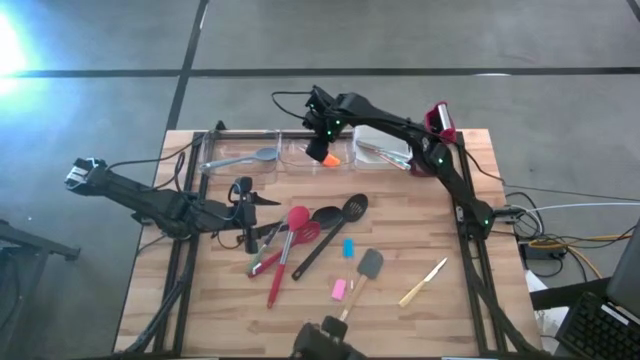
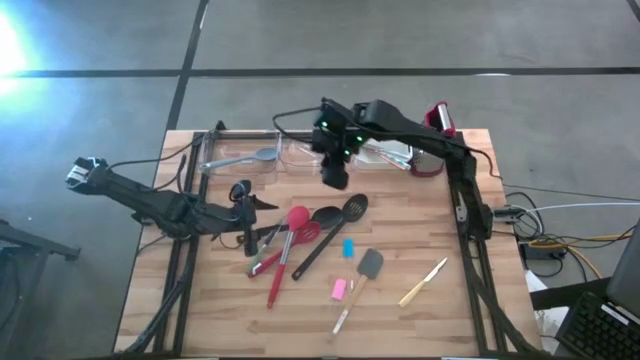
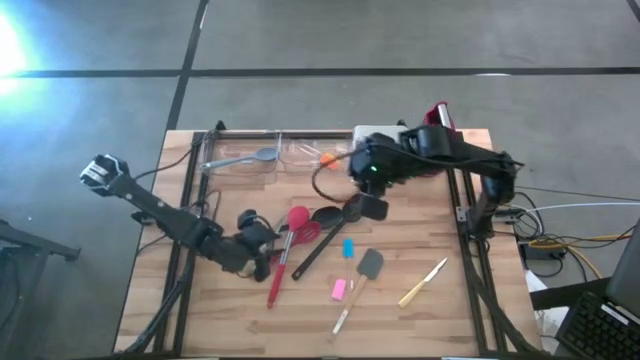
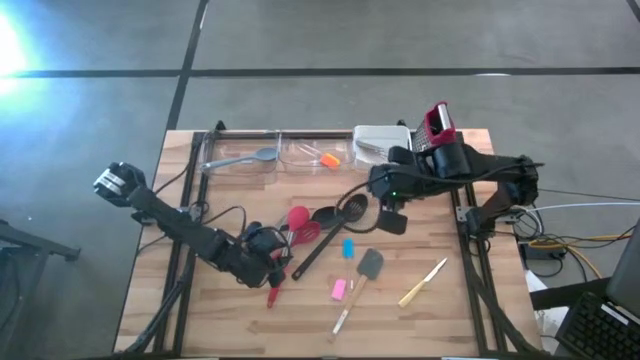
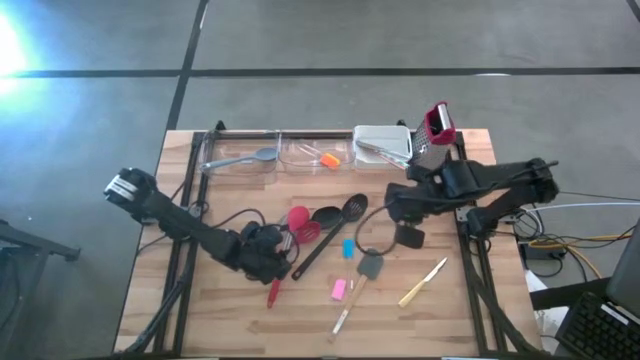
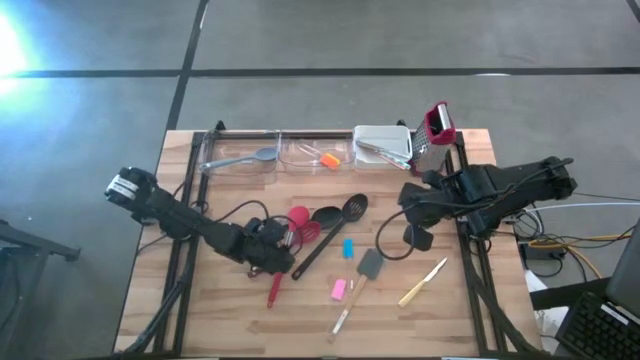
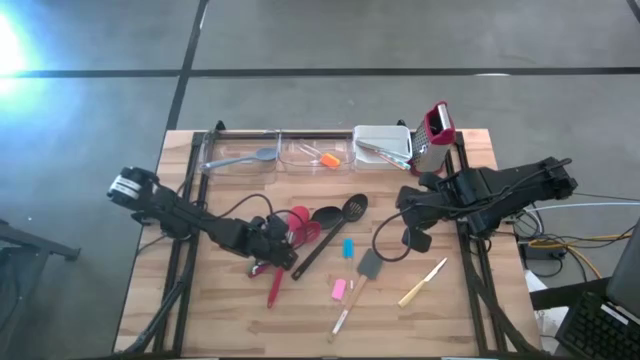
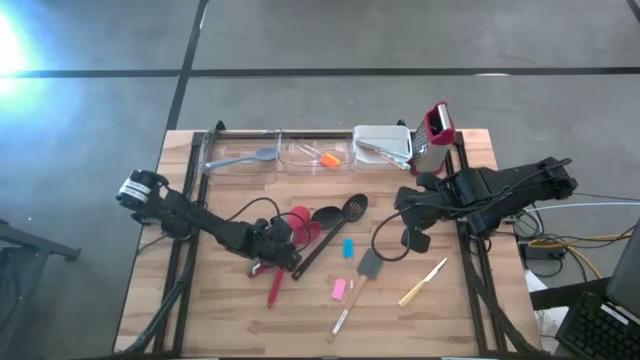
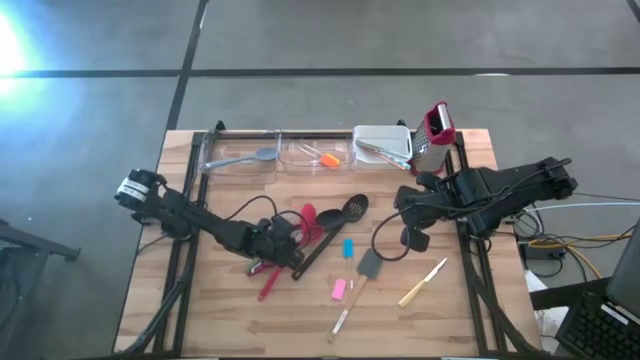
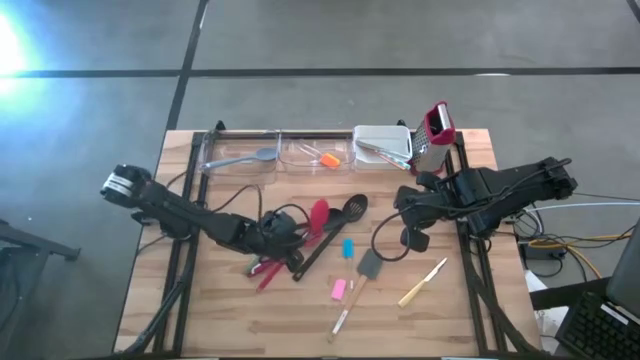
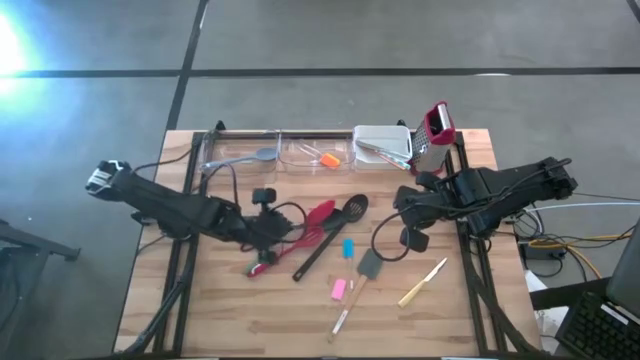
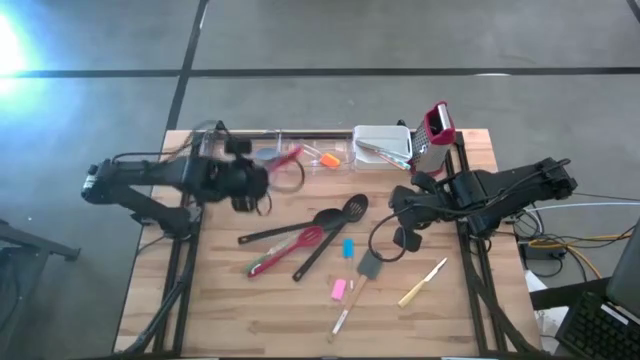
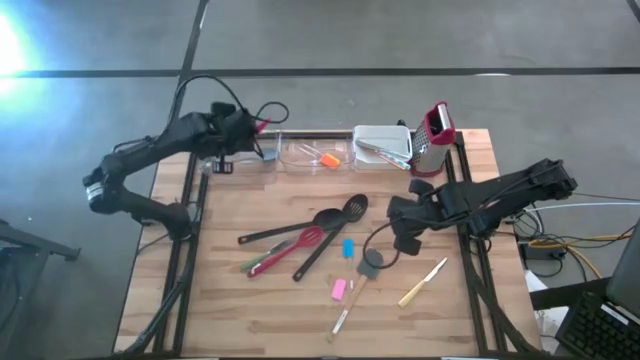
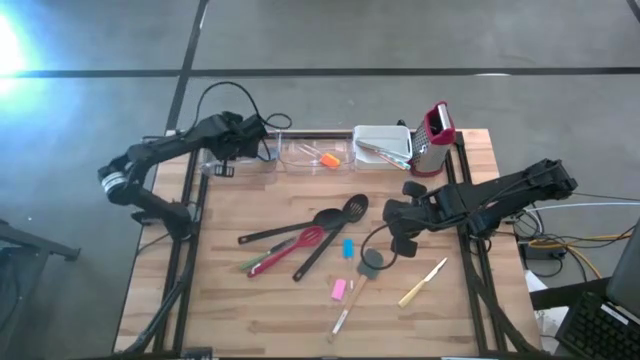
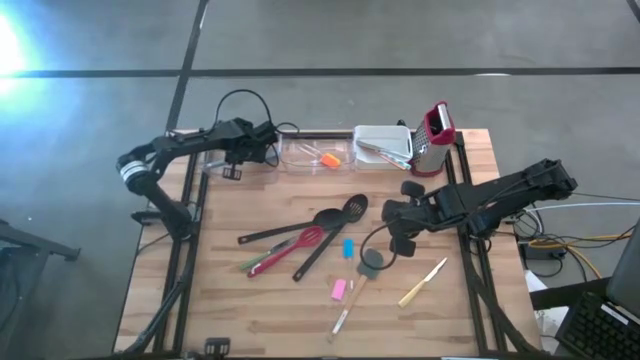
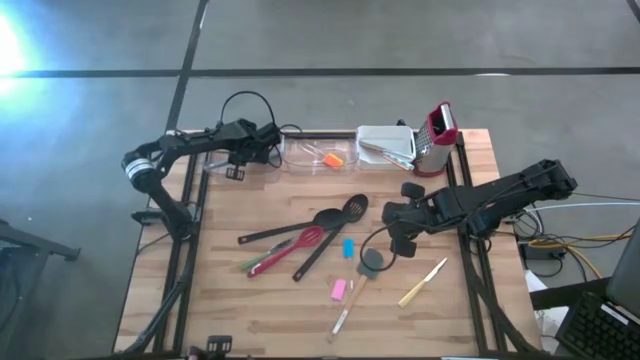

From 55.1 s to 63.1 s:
Task: Pick & Place Kitchen Items
Put the red serving spoon into the left transparent bin

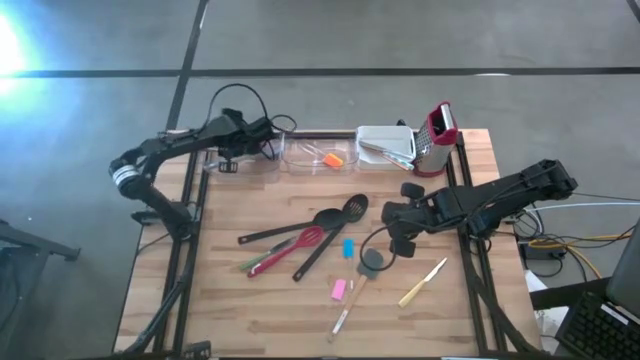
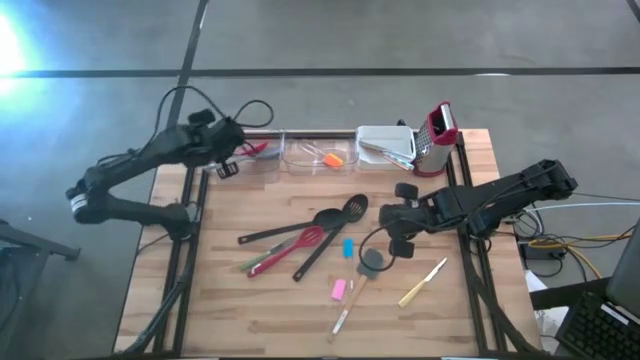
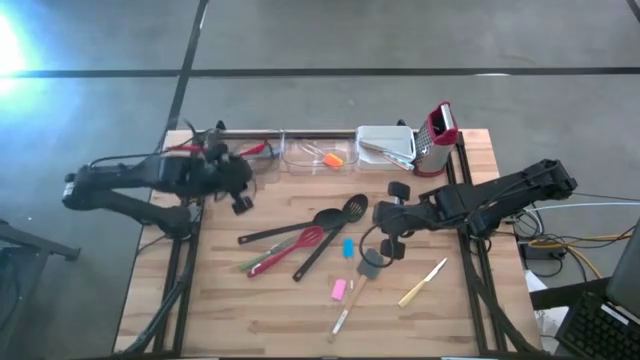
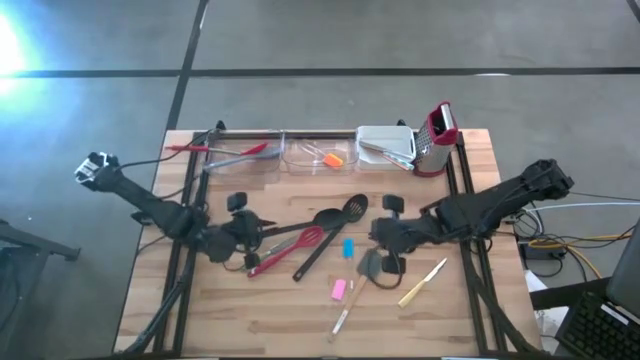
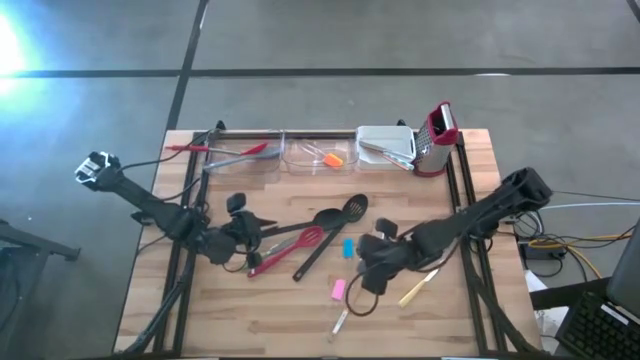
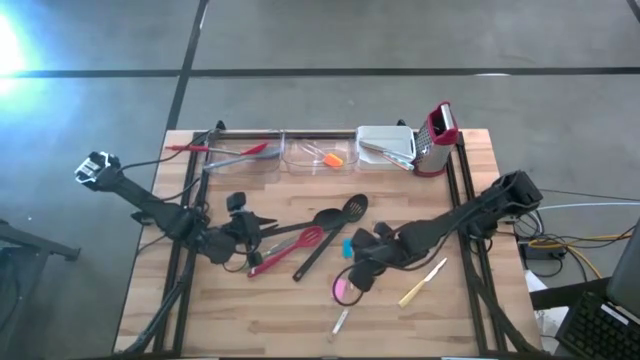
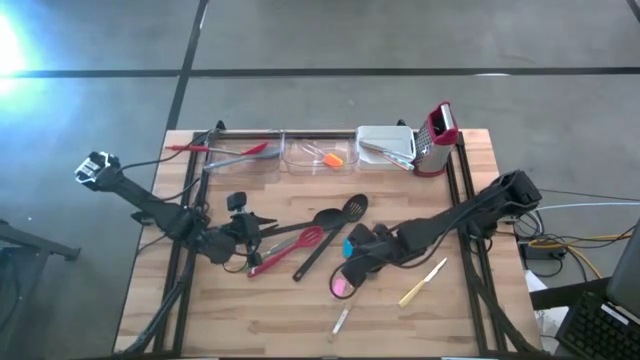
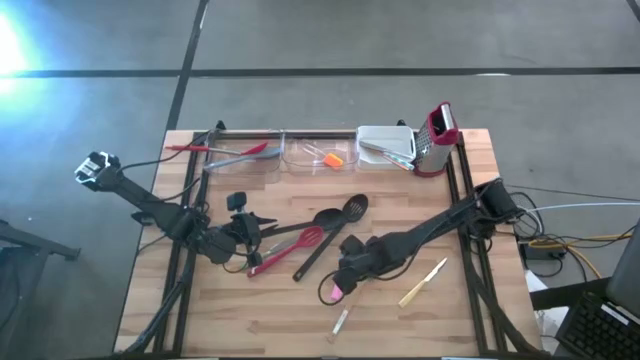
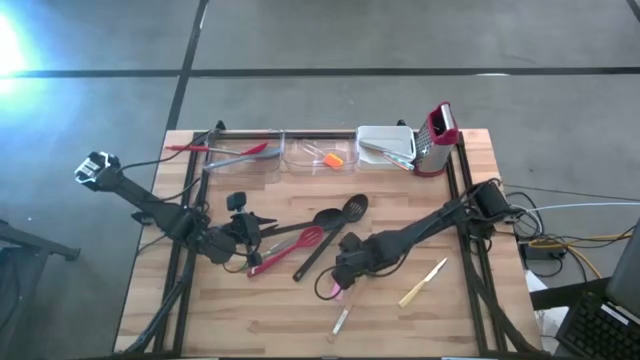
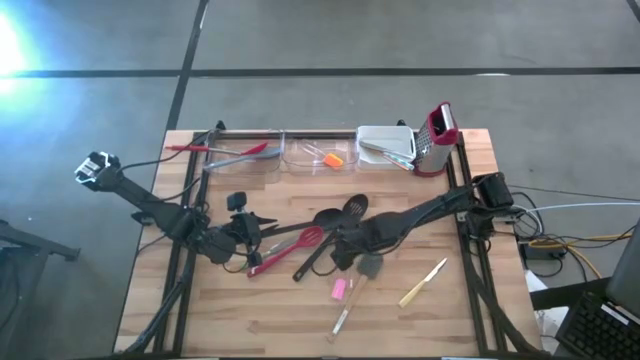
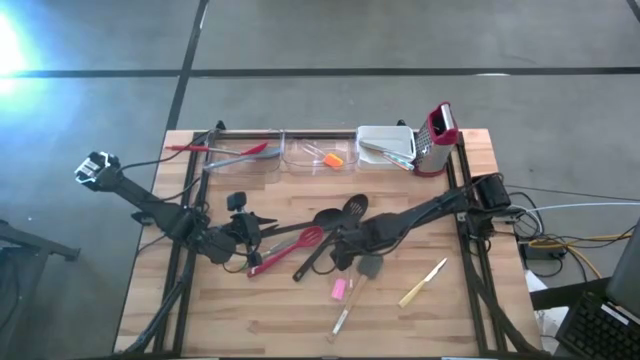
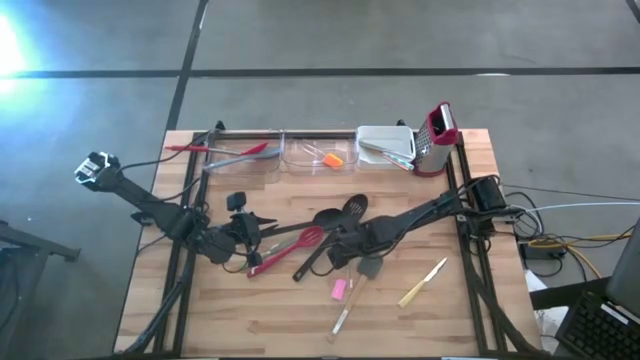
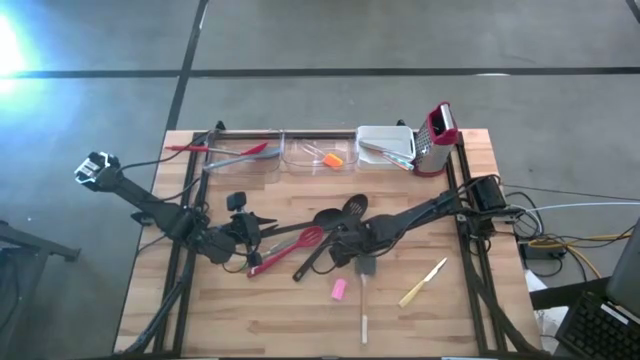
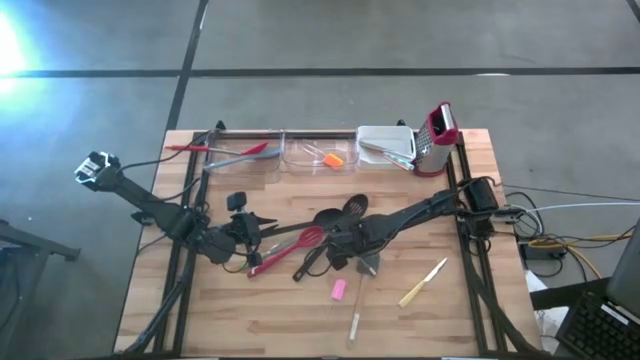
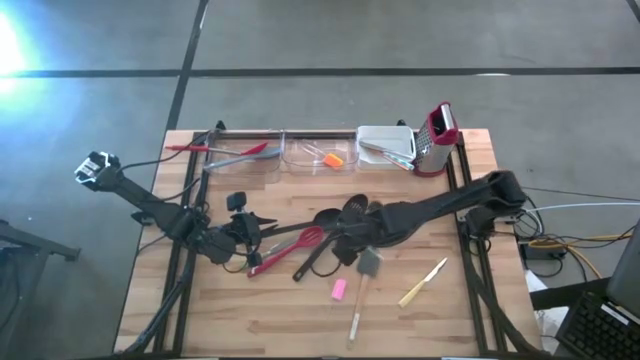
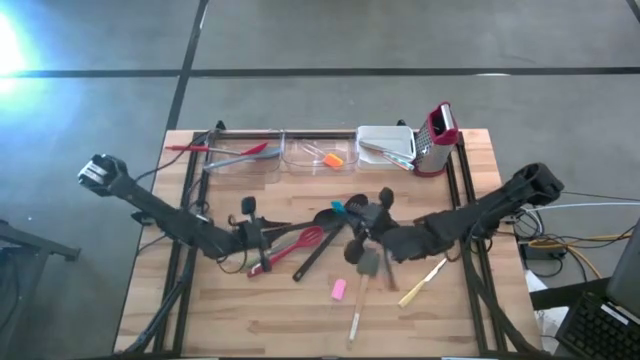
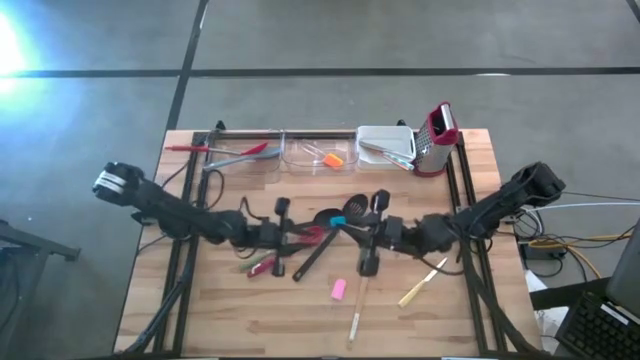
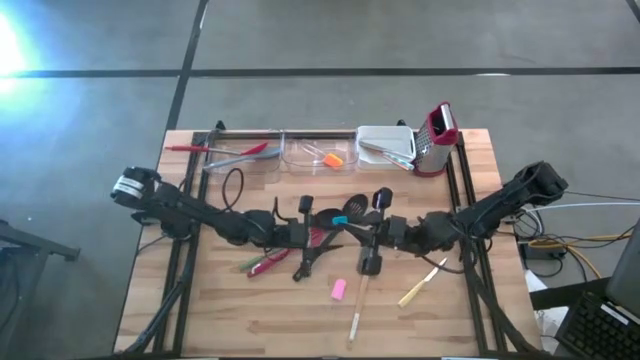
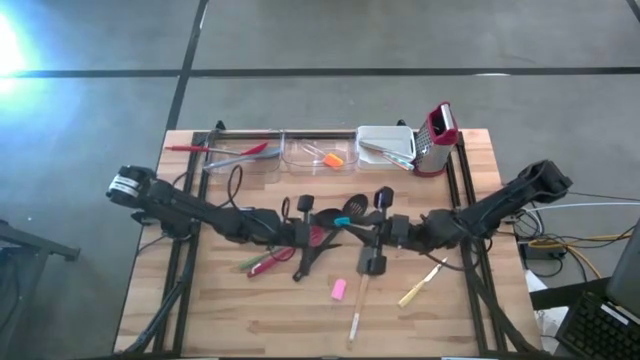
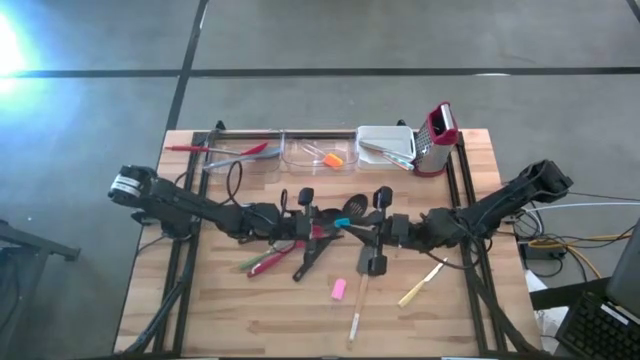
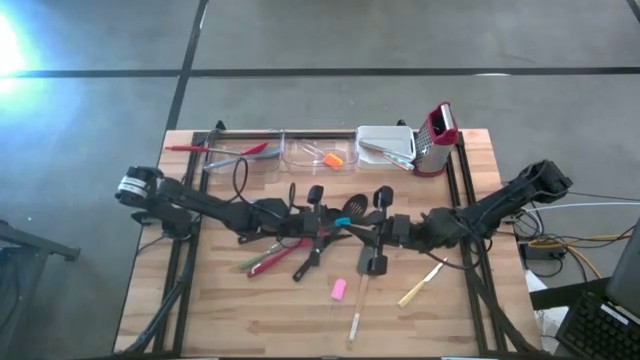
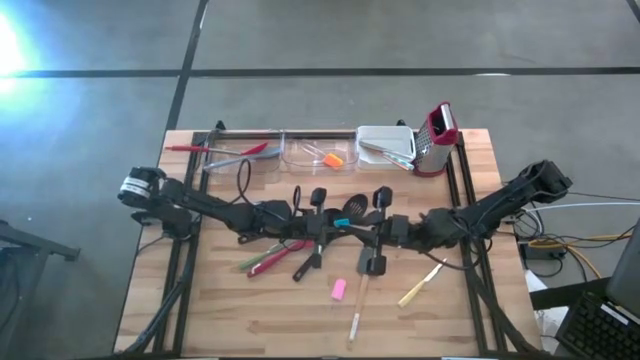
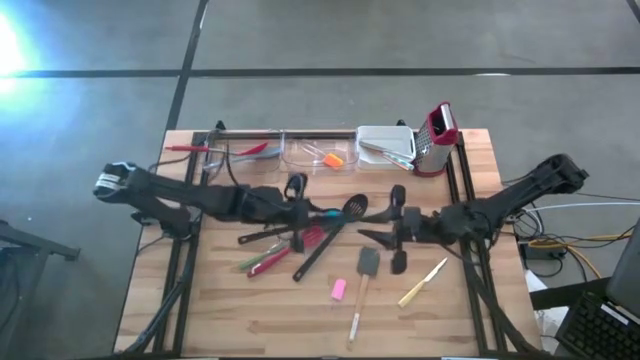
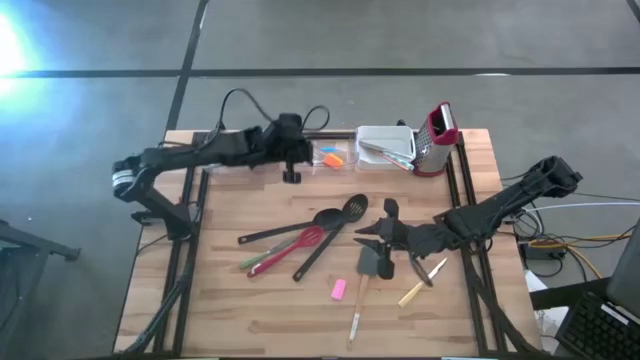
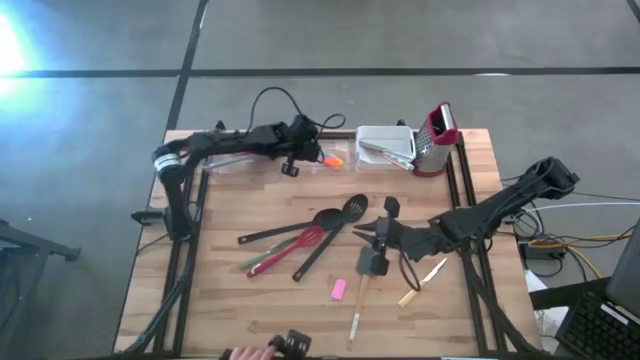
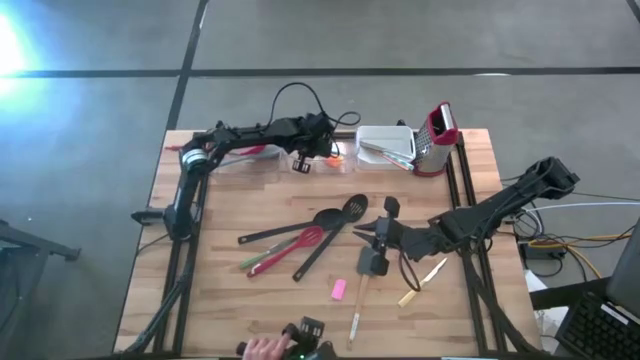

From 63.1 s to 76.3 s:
Put the blue spatula into the right transparent bin
